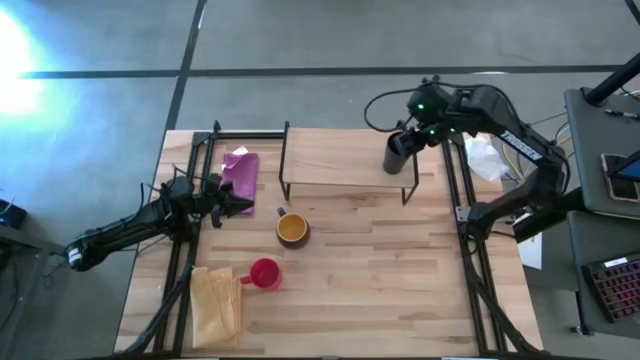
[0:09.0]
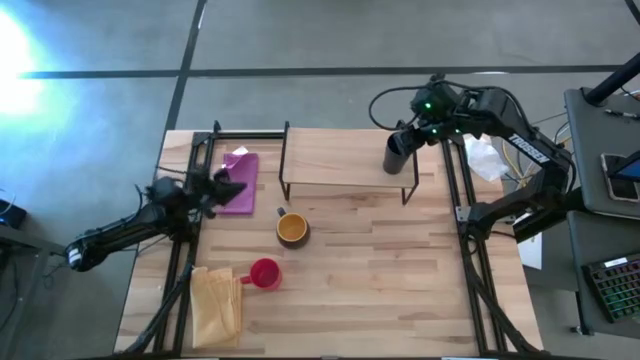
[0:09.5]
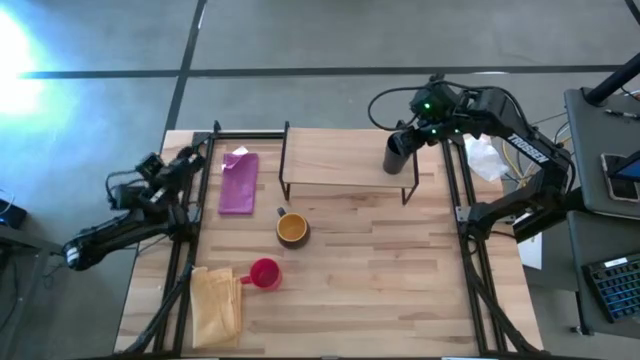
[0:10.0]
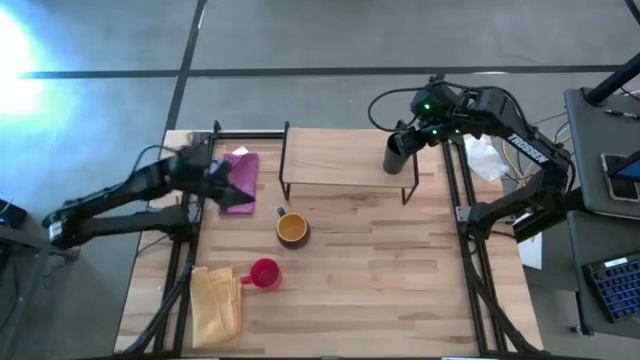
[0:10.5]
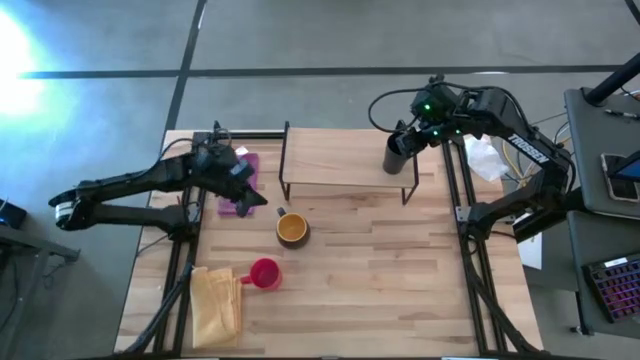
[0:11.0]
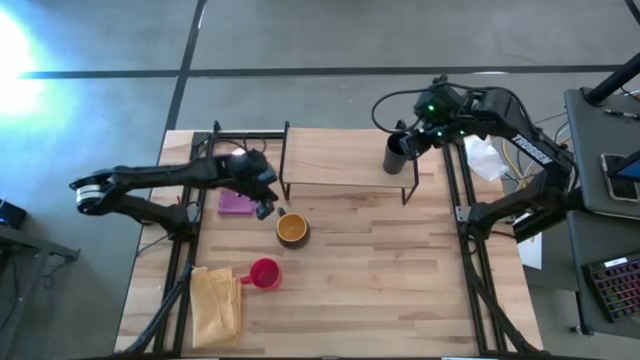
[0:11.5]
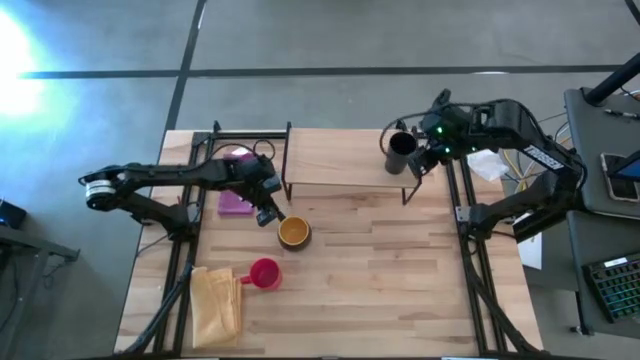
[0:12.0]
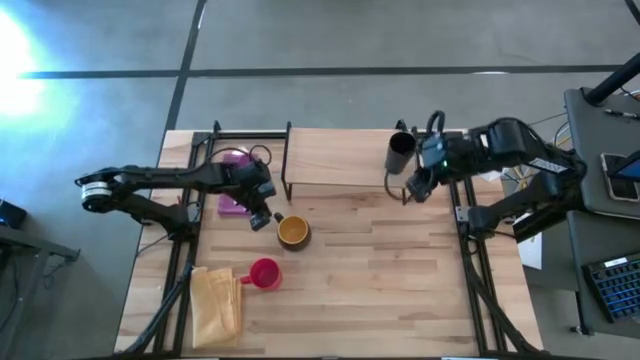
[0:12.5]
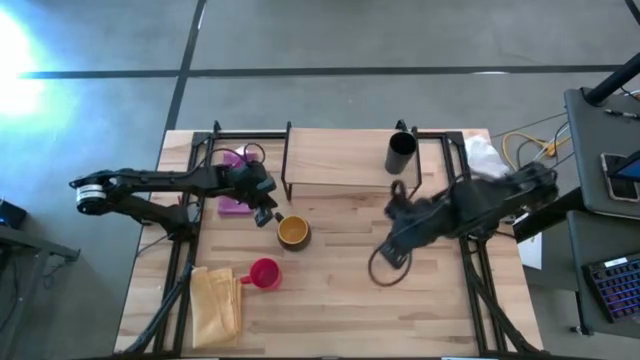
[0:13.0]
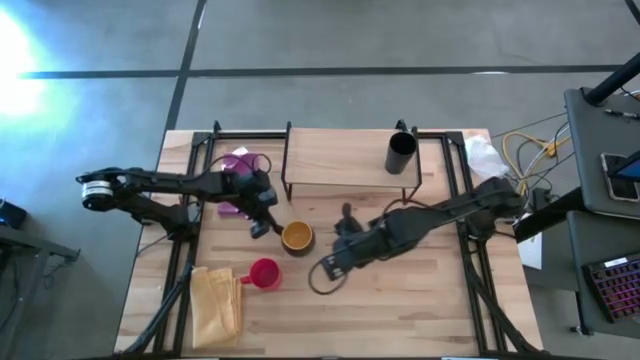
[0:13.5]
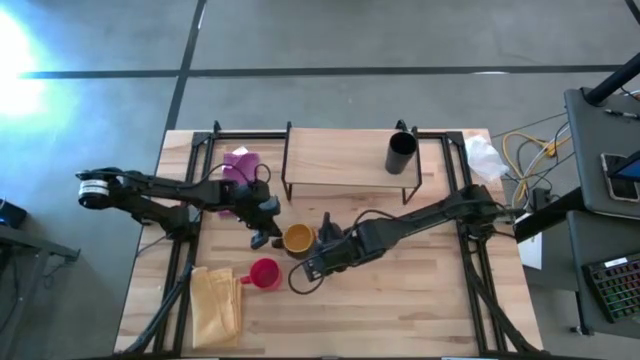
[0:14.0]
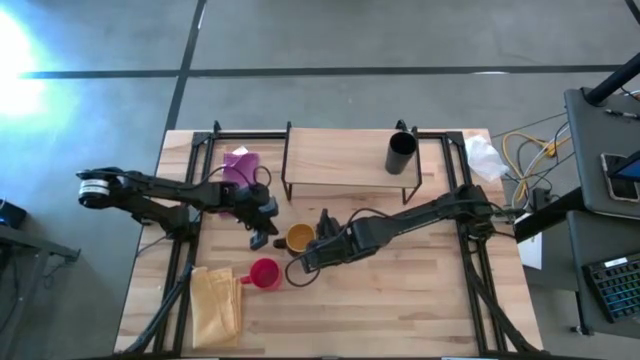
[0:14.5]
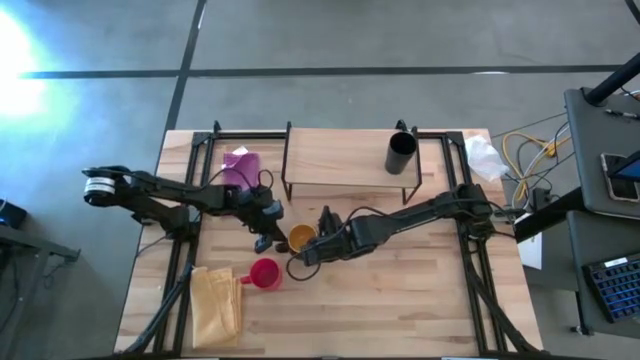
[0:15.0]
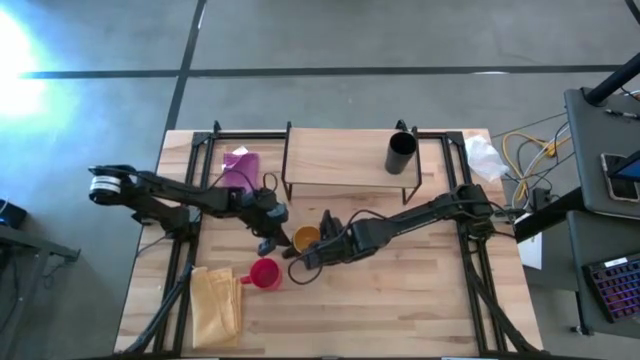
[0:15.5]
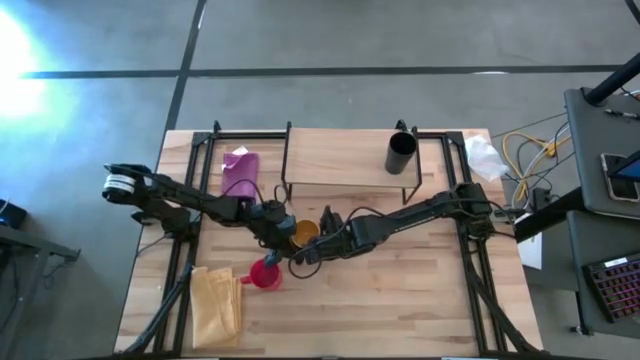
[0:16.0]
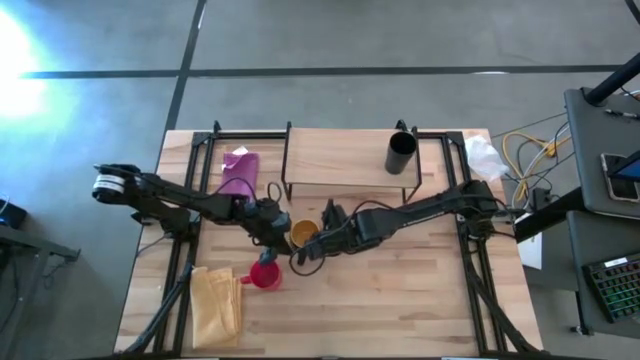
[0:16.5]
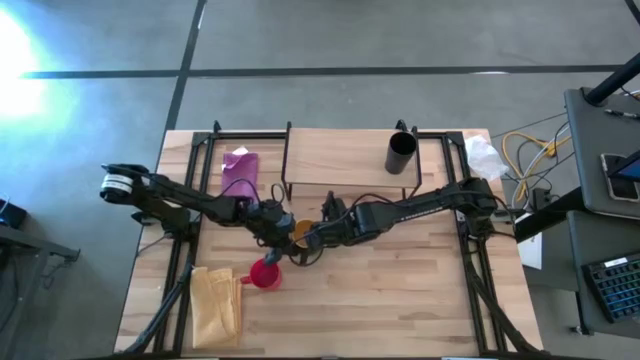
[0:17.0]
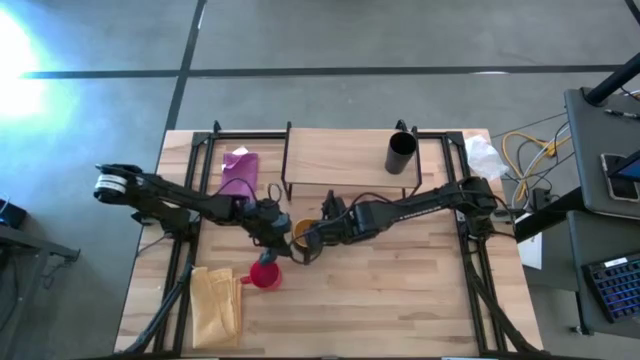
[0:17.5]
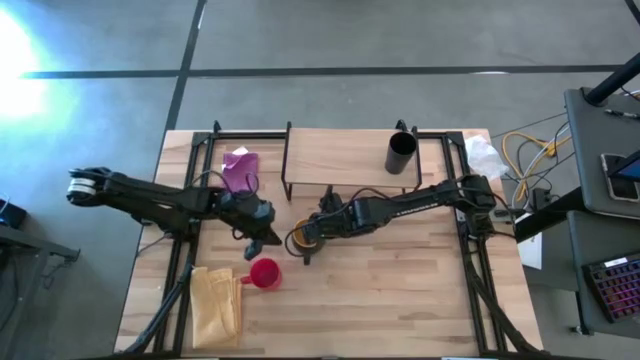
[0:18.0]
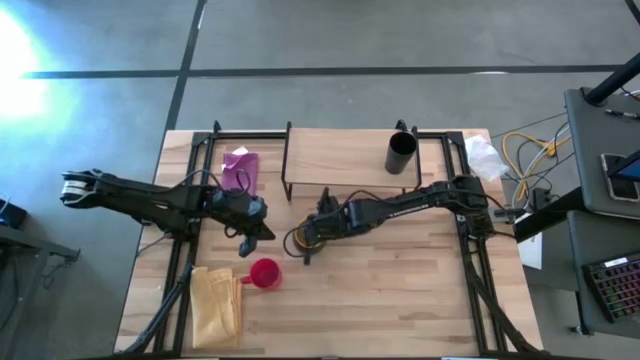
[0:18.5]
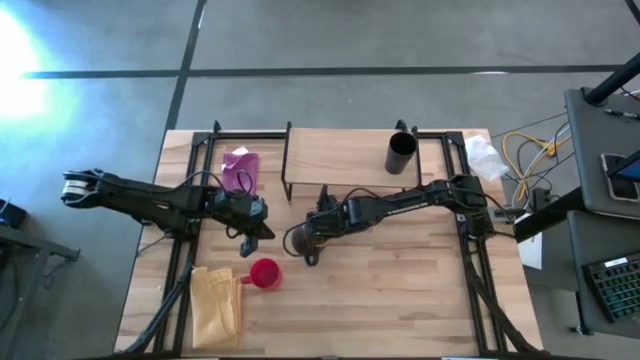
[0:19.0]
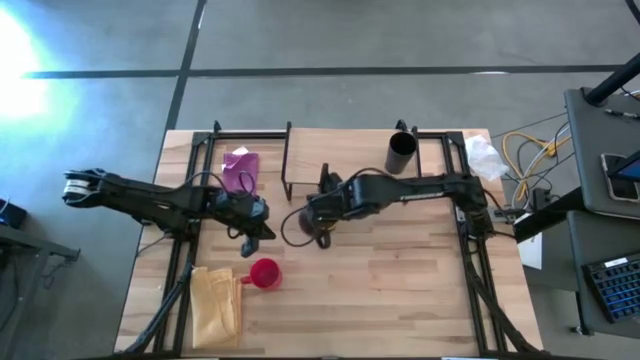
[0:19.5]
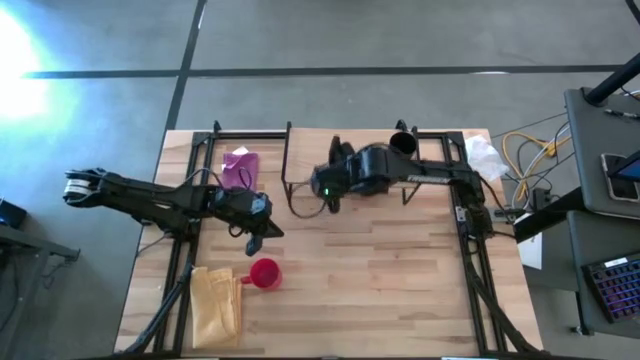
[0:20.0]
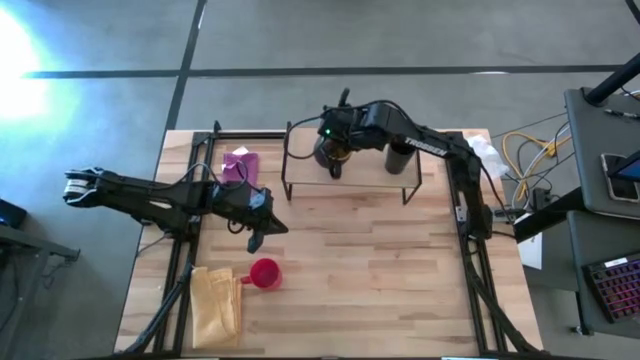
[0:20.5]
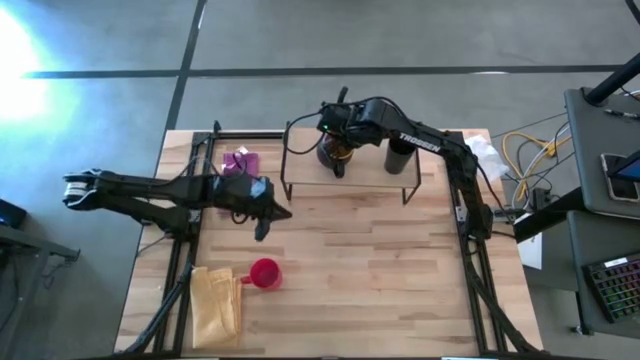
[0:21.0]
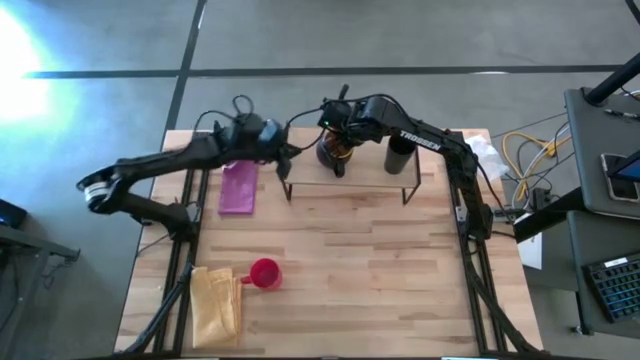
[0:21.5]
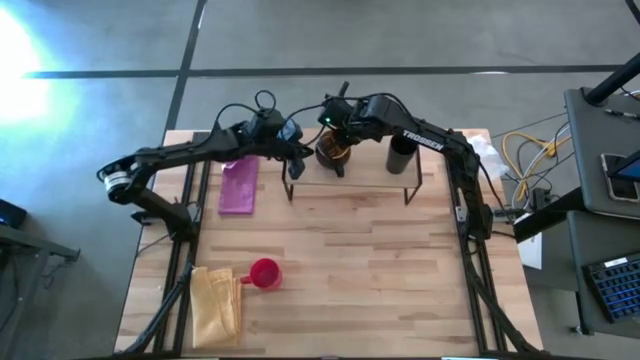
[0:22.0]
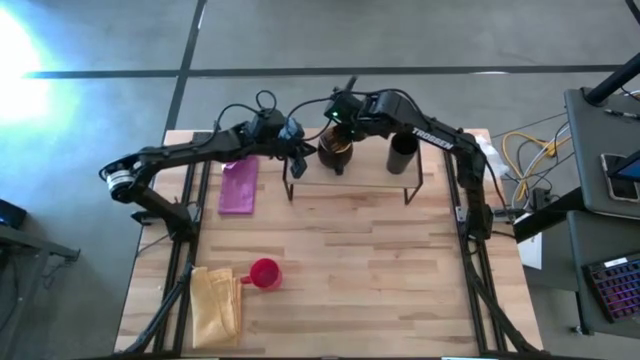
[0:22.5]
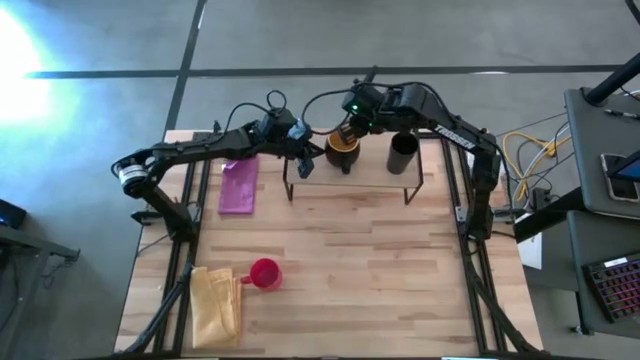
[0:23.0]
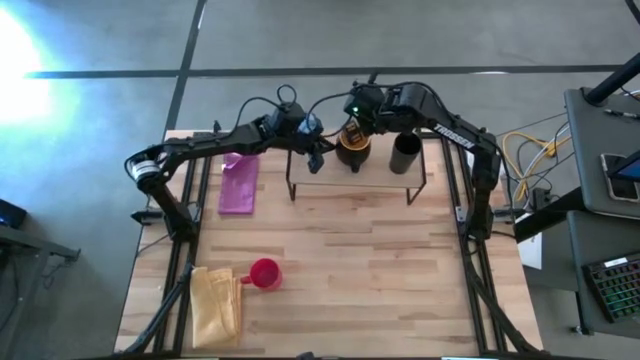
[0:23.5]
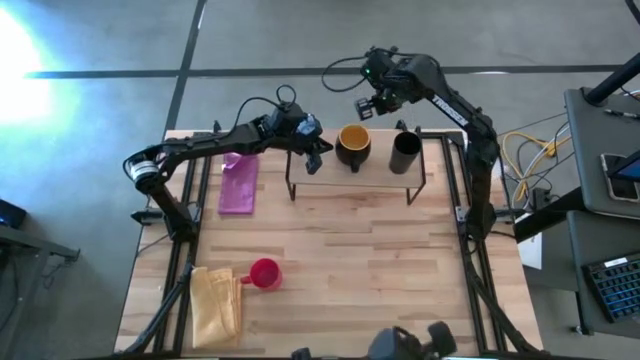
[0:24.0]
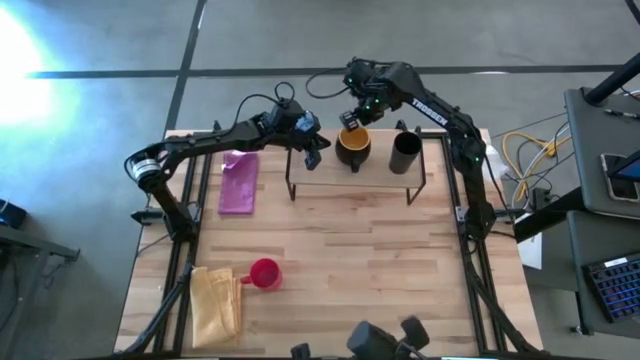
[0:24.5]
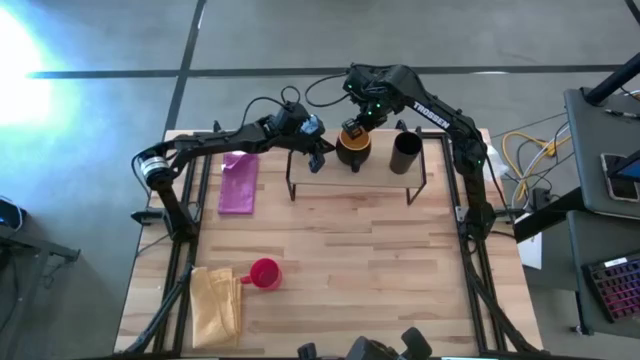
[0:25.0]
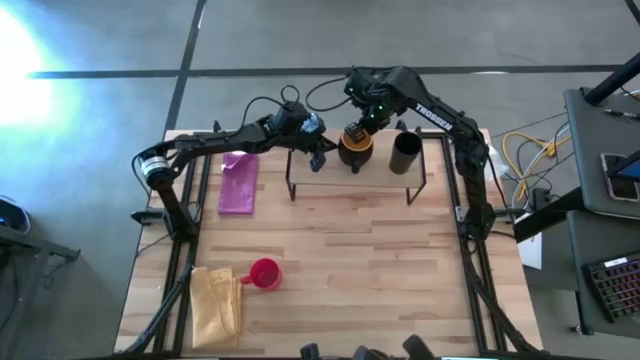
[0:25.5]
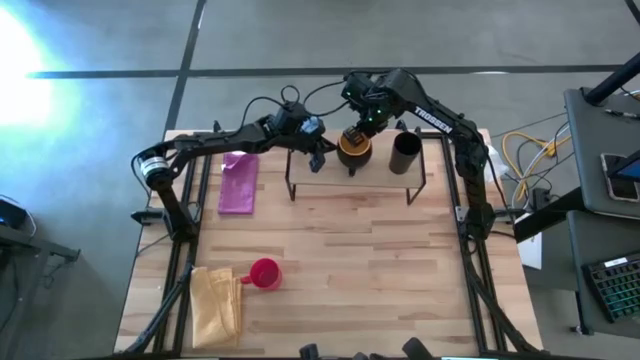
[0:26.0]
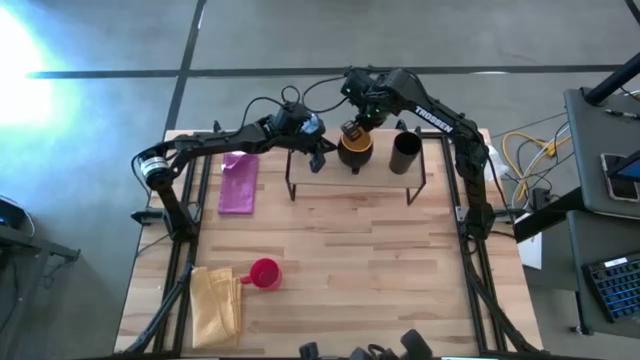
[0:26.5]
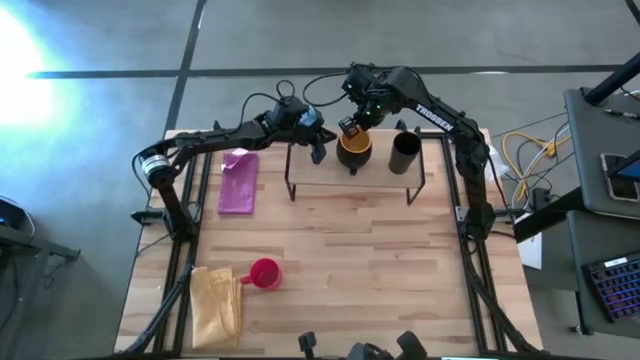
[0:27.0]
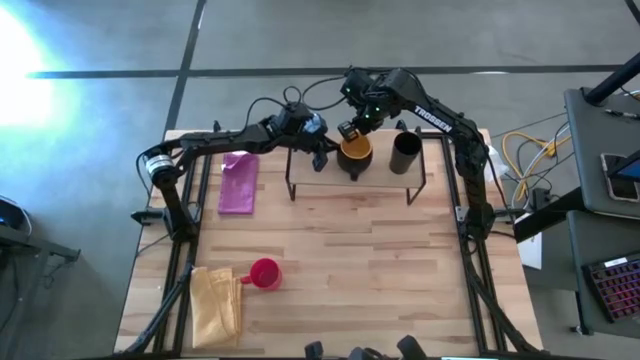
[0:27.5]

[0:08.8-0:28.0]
Task: Stack small to large cups/mugs on shelf
Put the black mug on the shelf

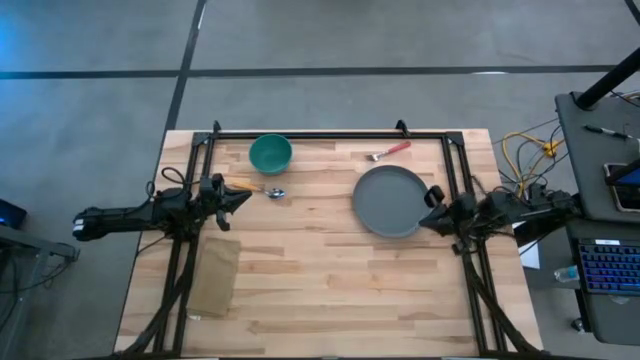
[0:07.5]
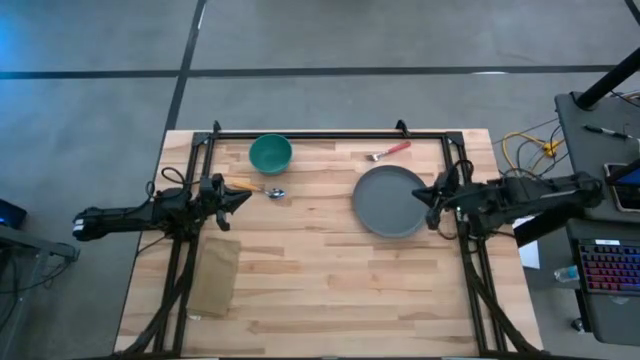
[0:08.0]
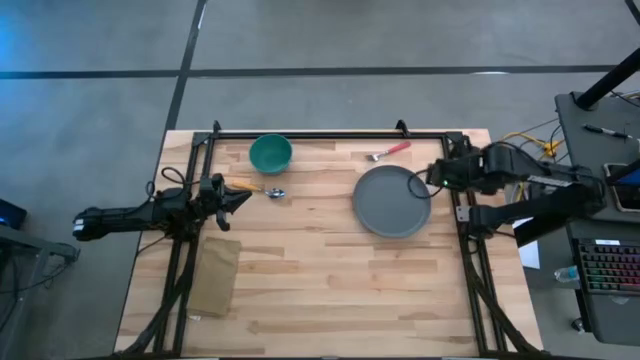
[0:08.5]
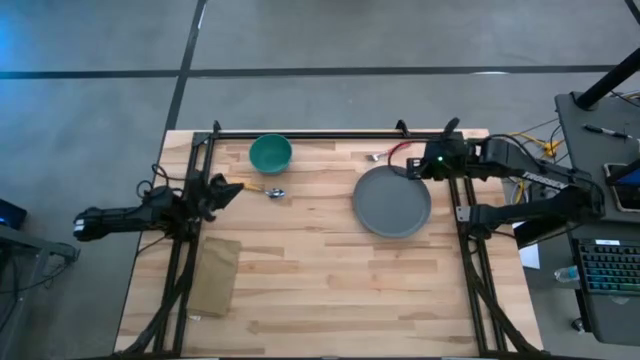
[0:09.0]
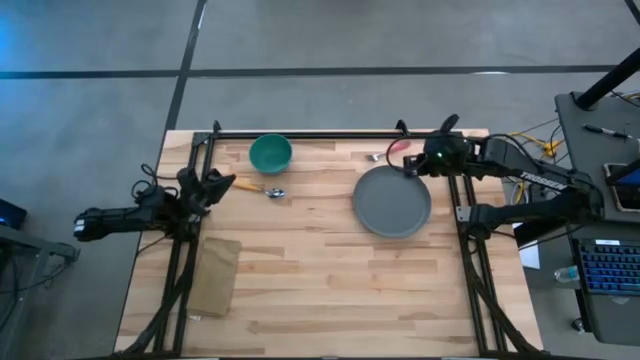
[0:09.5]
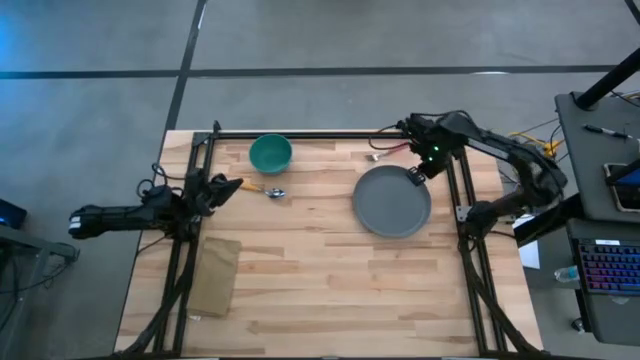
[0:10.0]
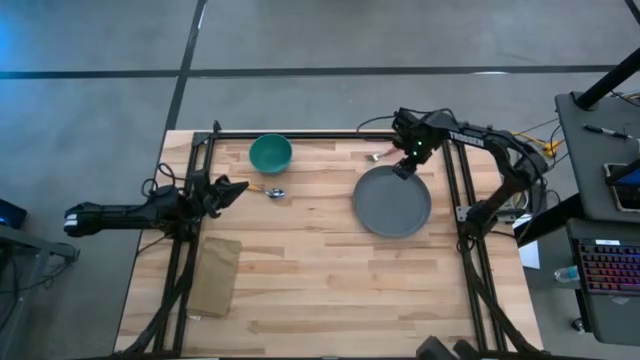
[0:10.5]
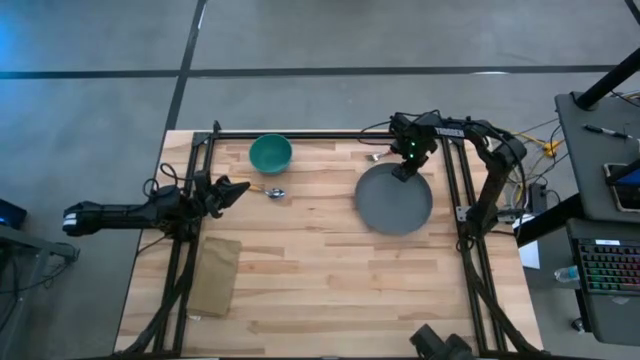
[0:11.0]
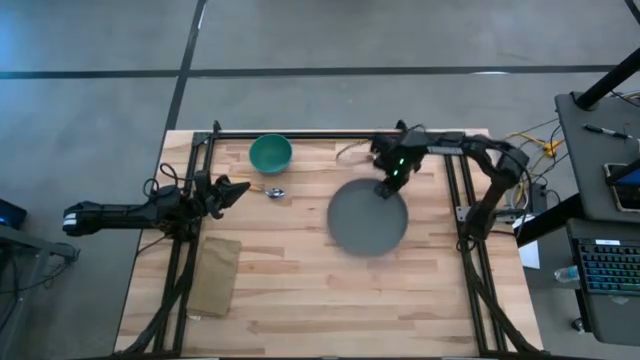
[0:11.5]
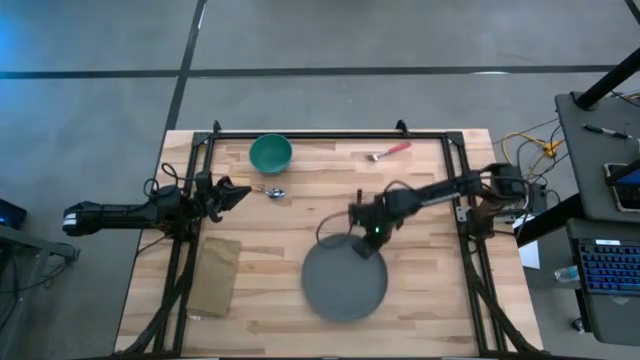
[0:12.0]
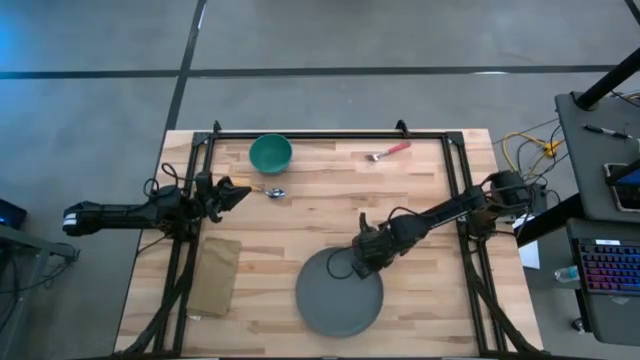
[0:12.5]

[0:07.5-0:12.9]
Task: Set table place
Move the plate to the center of the table
